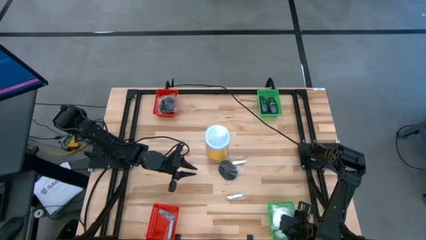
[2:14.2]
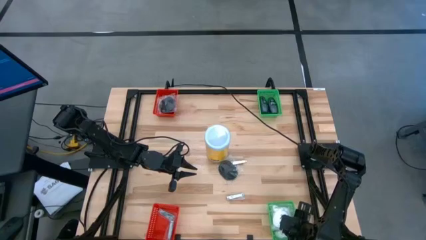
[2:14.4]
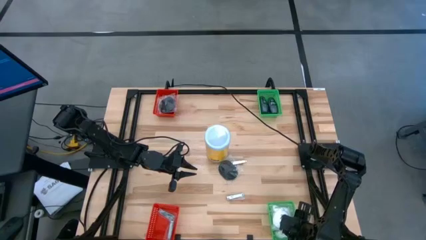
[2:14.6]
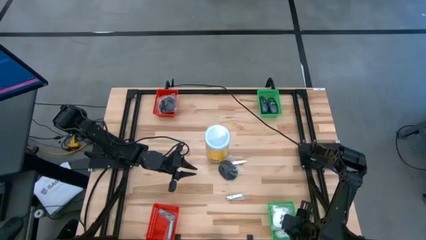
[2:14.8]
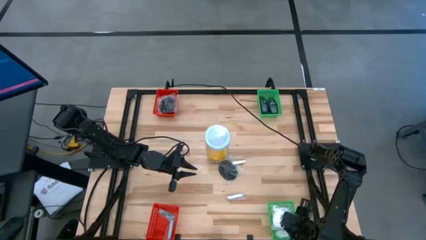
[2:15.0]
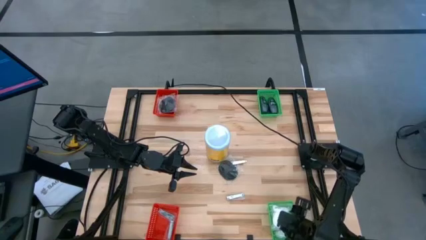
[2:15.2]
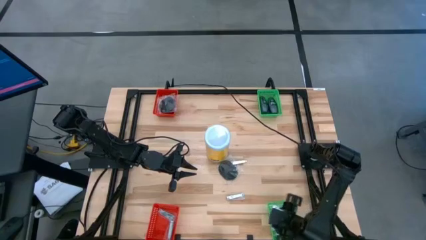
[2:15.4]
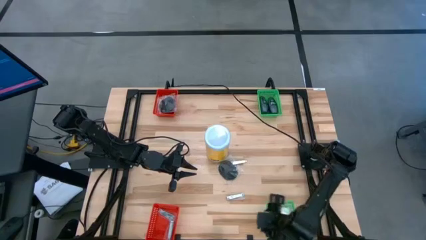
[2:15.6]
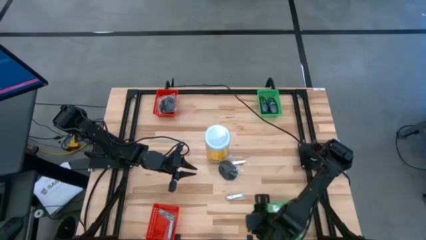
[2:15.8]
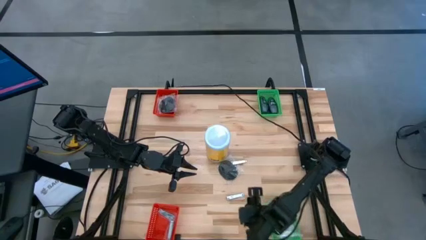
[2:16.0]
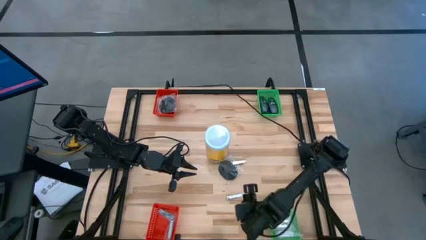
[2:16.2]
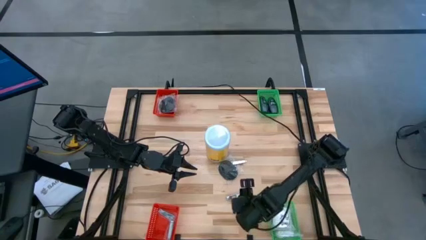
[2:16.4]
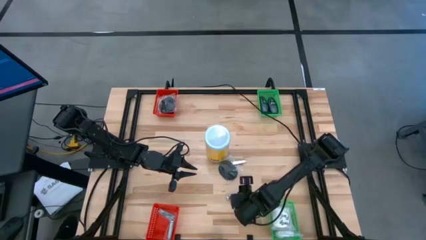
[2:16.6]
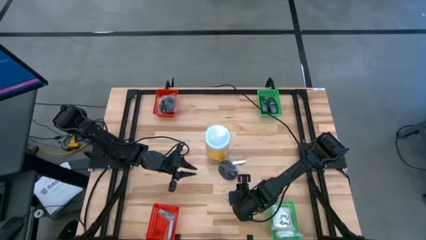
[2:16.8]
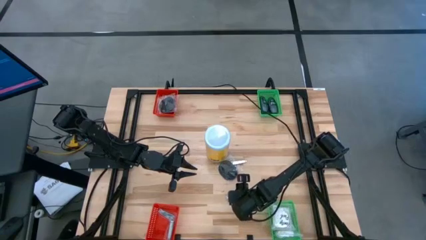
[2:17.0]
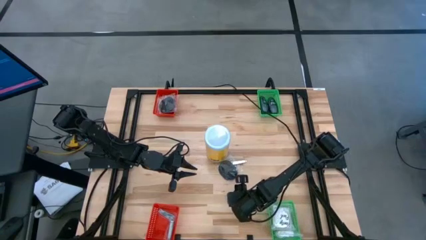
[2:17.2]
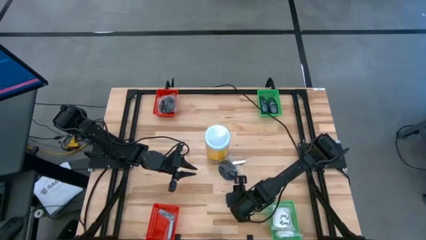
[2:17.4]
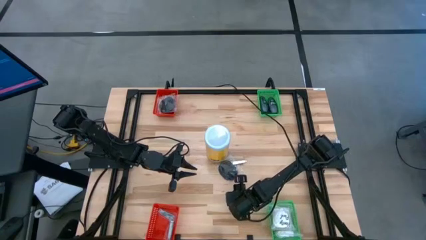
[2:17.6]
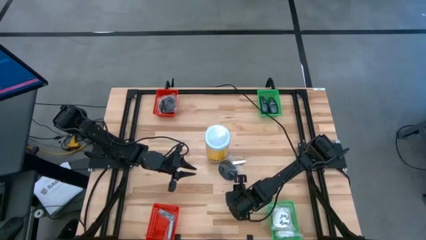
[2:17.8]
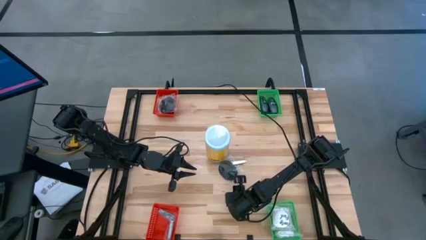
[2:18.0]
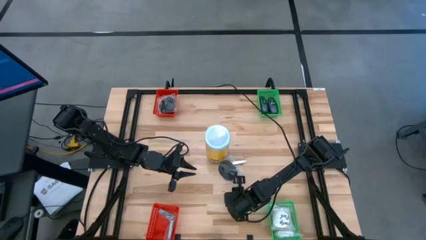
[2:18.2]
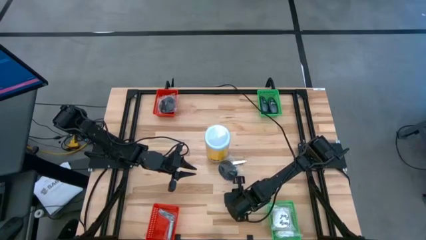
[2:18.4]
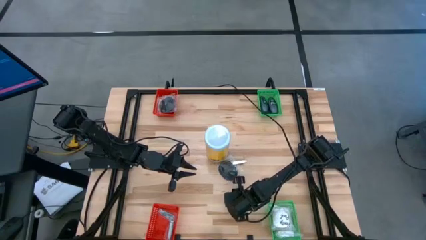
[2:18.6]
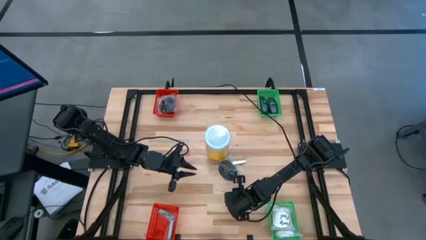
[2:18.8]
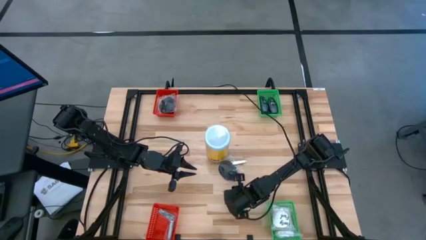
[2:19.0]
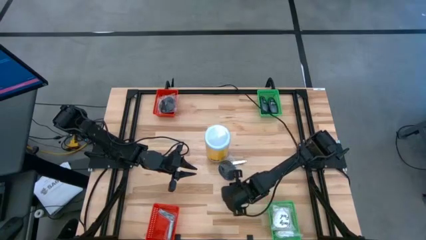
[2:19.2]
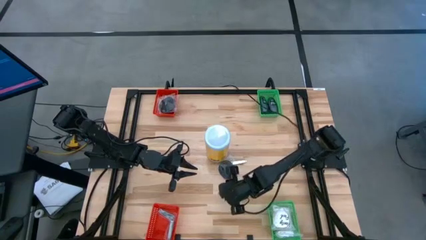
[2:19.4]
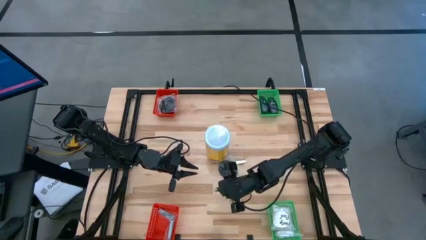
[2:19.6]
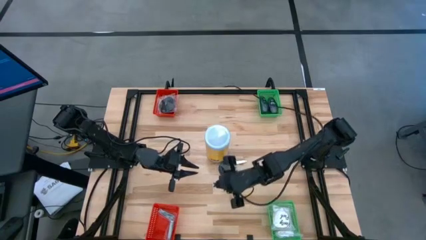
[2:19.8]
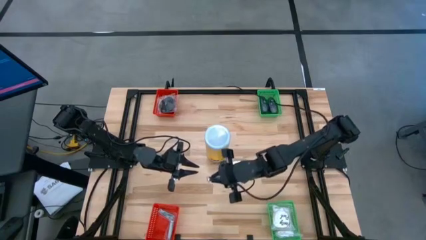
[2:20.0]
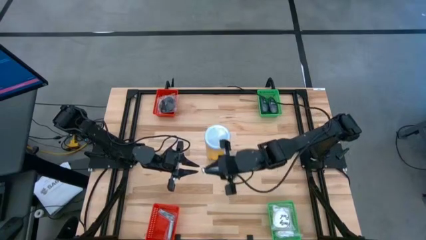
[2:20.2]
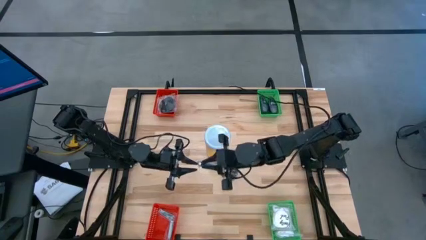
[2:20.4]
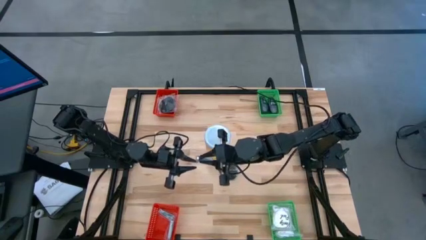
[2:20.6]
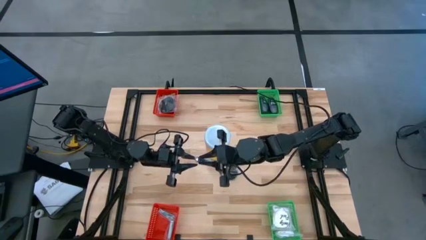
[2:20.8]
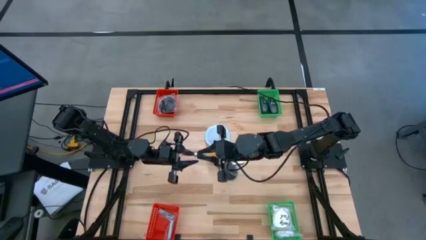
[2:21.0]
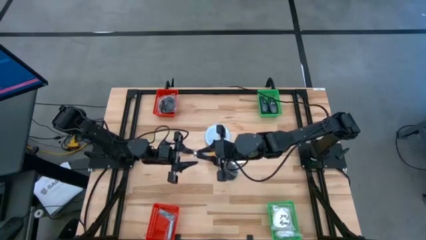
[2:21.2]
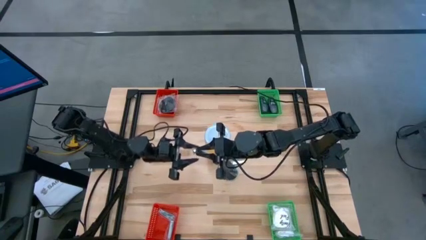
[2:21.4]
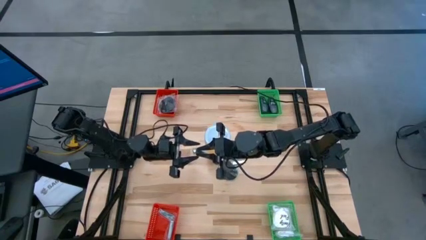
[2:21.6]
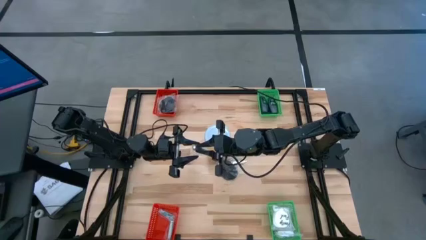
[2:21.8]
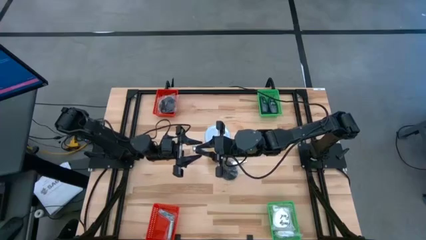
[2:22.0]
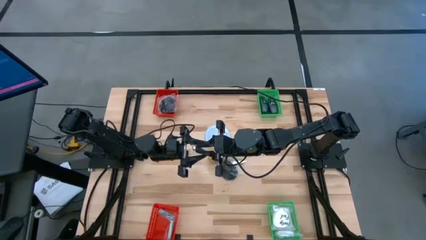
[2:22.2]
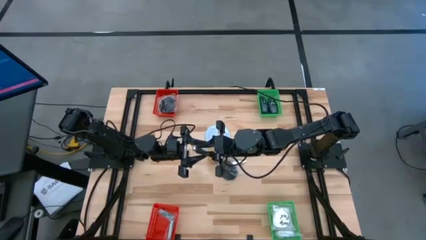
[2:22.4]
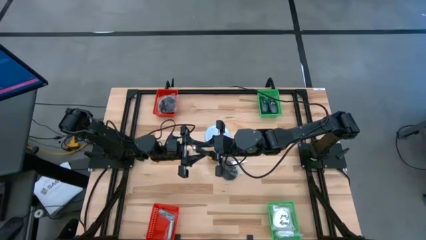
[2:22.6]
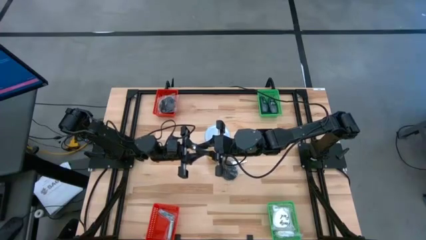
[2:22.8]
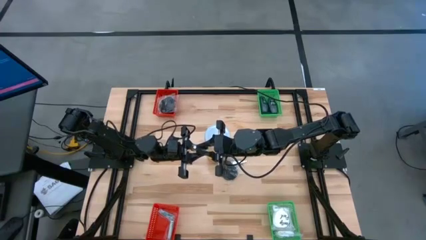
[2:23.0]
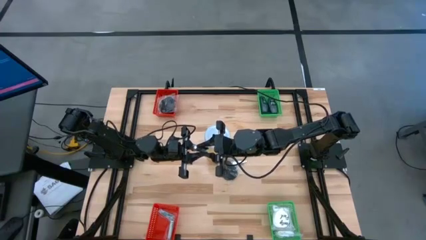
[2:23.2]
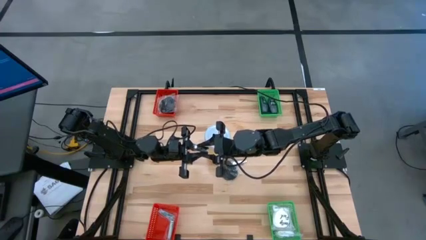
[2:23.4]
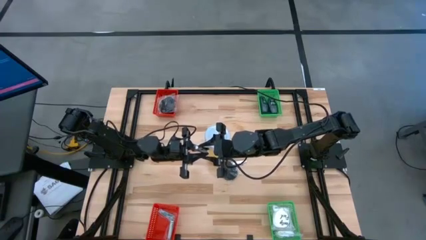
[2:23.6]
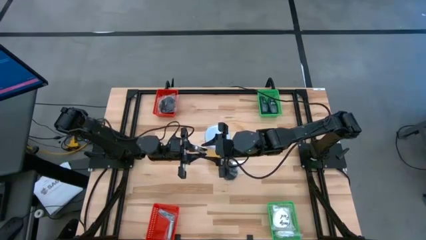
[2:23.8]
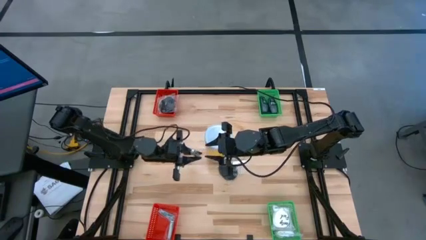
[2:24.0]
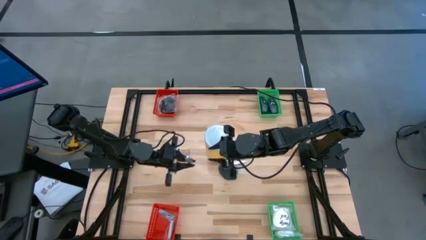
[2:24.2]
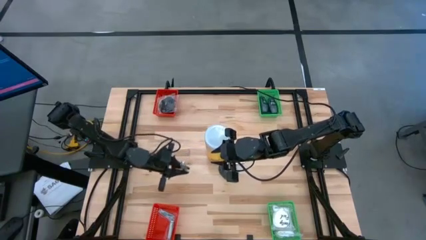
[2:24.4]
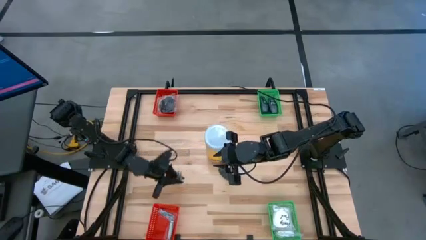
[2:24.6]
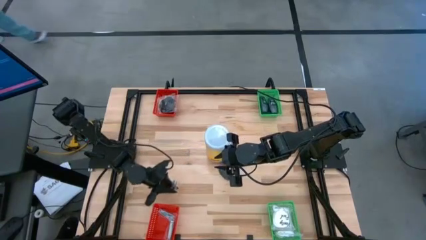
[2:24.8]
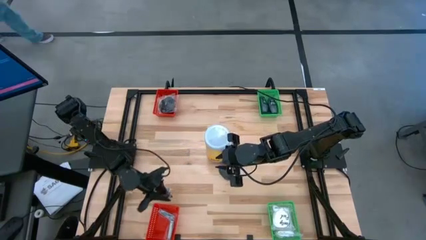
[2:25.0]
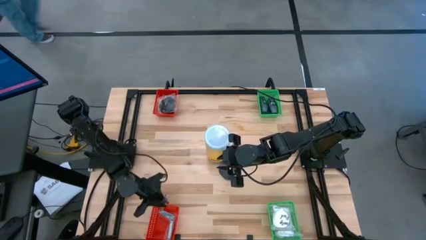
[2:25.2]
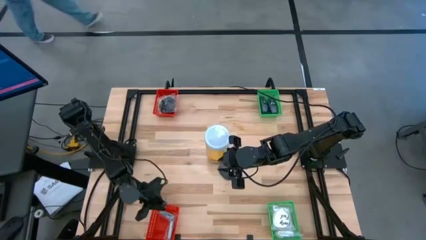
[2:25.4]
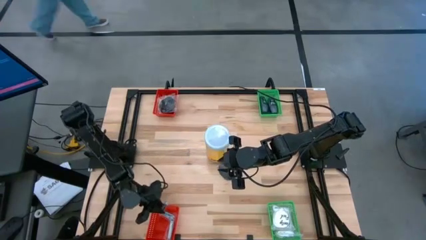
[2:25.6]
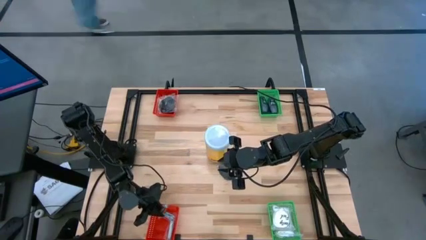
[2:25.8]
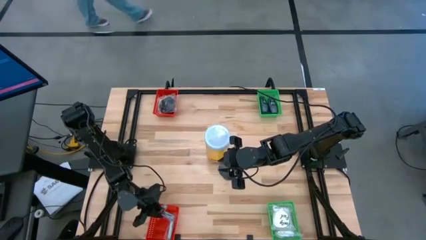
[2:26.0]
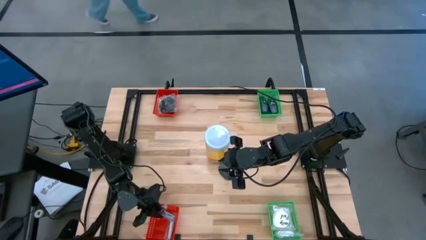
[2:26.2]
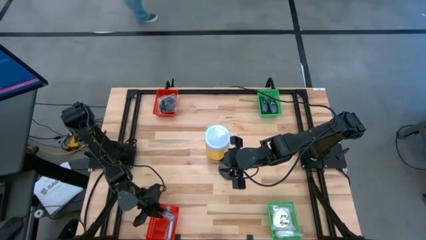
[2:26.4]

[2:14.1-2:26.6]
Task: Pick & Place Travel size toiletries
Put the nail cutter into the bottom orange bin

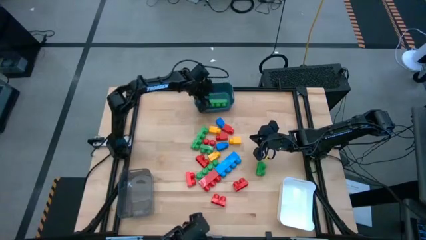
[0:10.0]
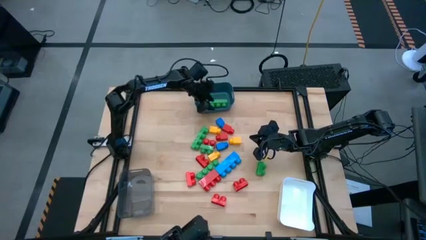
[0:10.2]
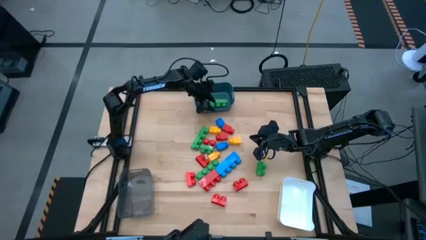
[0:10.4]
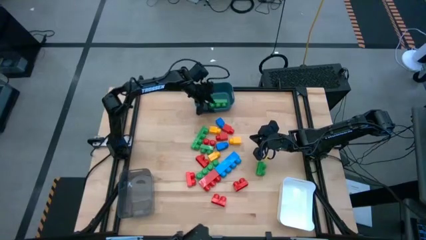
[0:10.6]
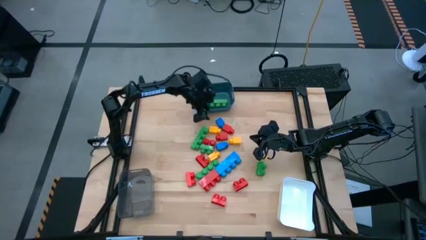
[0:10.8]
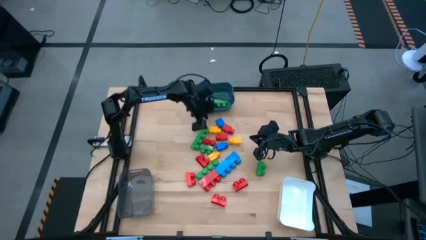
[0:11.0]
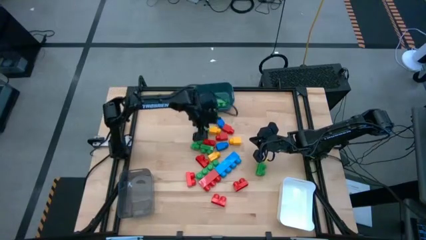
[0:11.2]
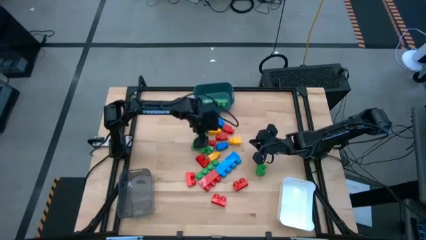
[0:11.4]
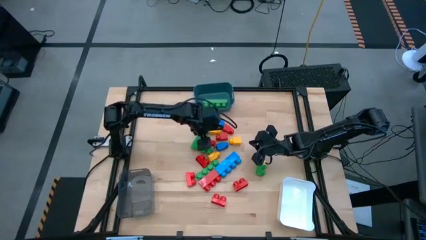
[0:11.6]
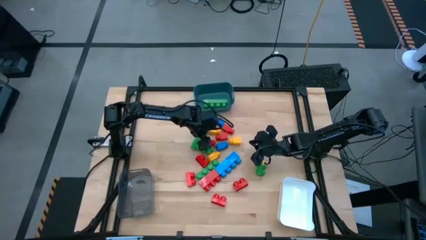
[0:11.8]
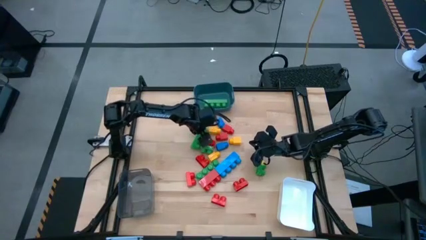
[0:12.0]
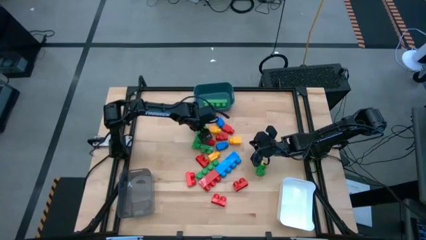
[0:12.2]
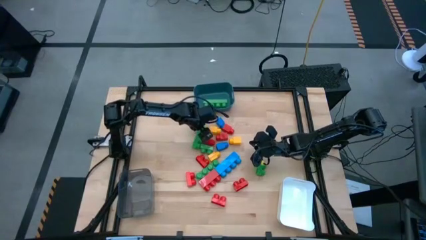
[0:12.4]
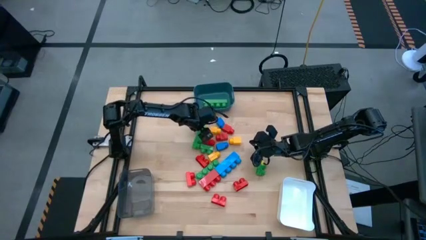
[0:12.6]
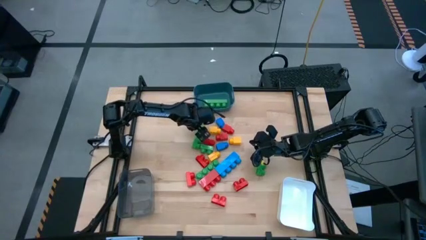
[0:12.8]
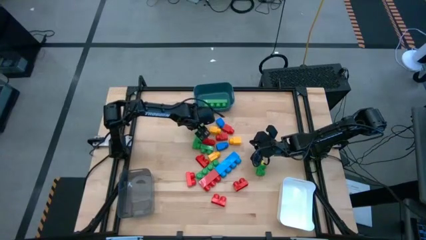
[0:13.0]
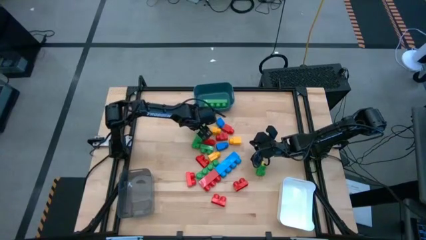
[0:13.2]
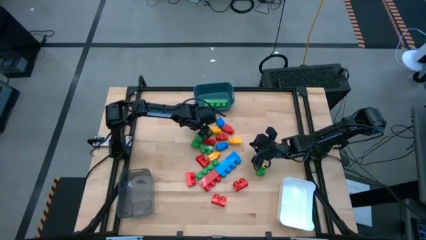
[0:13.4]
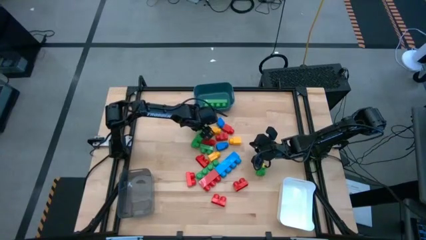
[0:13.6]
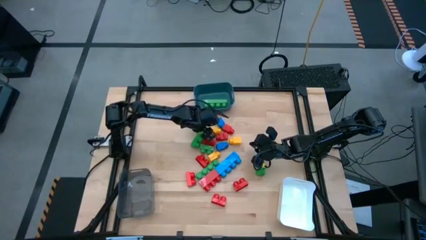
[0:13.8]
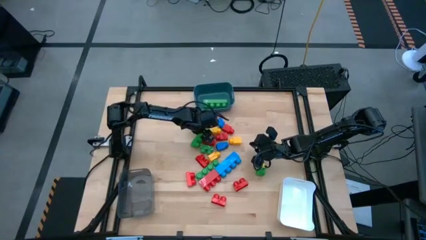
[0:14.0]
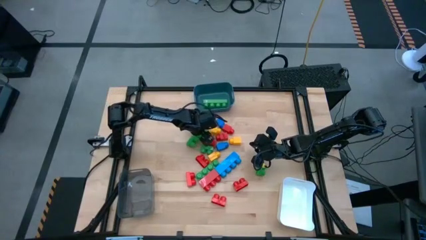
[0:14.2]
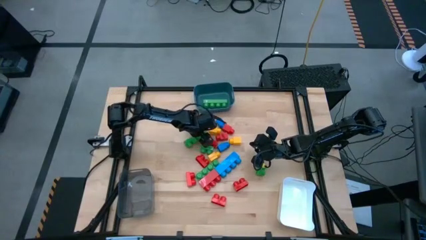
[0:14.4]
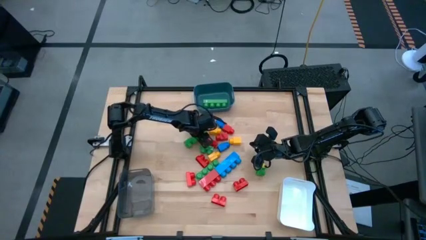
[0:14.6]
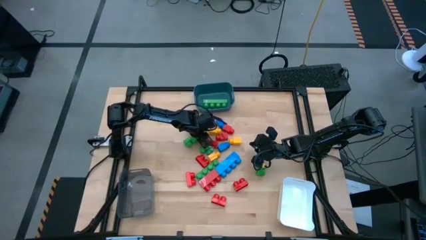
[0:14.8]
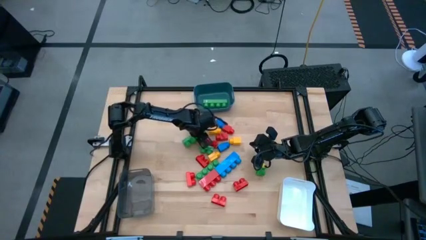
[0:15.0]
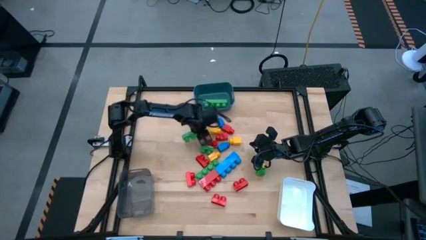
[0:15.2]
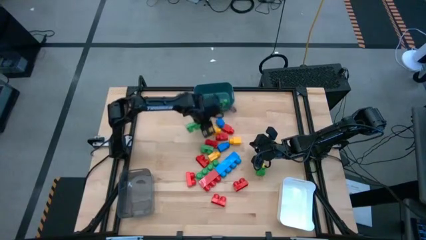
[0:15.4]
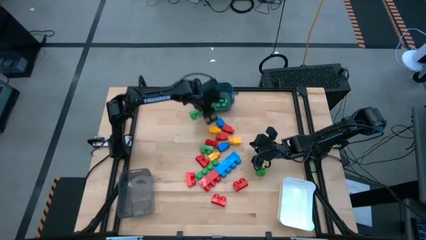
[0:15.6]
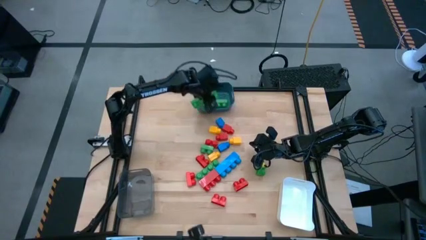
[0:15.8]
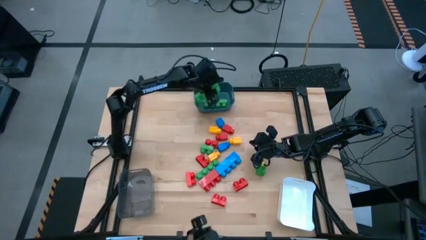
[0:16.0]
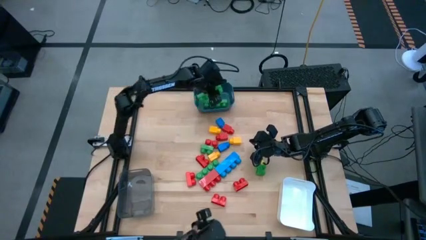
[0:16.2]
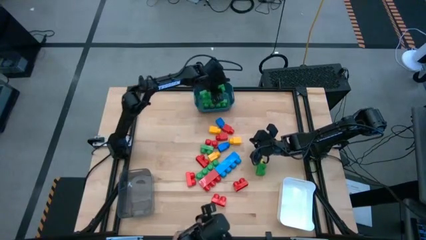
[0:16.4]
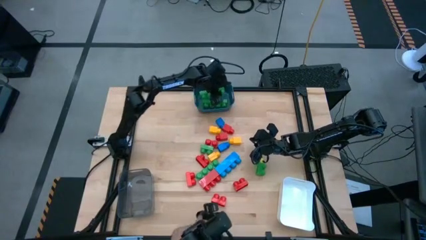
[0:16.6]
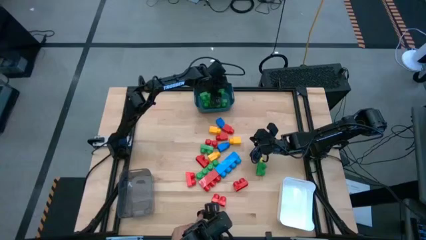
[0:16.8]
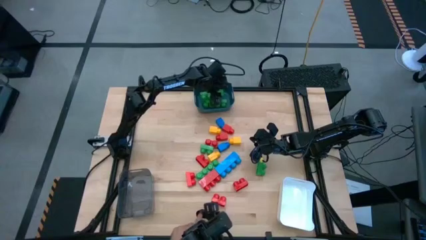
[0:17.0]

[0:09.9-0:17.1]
Task: Sort blocks by size
Put the green game piece into the blue container
